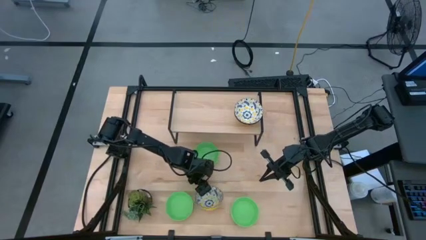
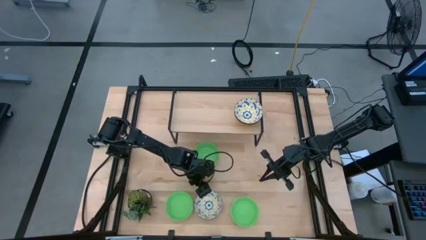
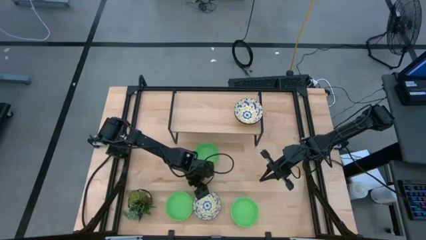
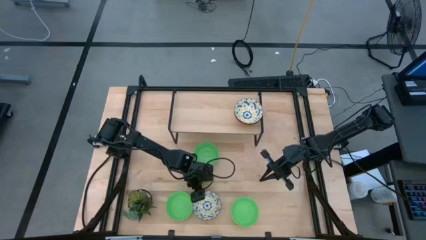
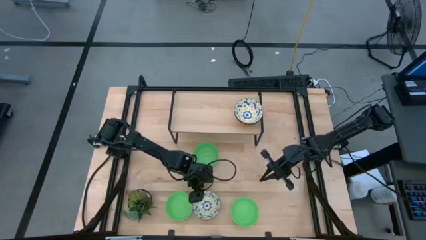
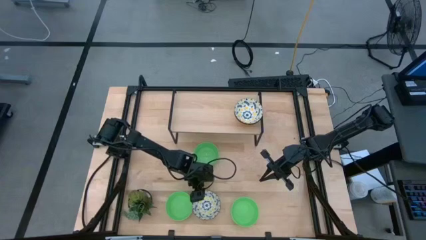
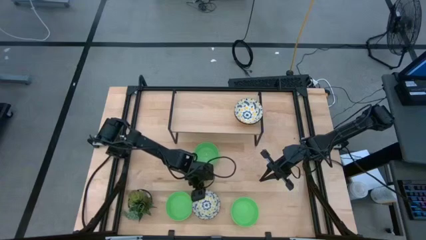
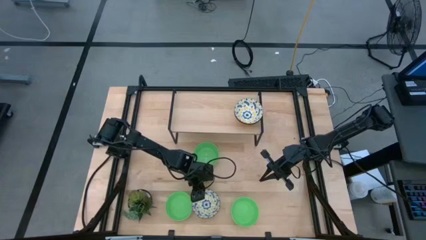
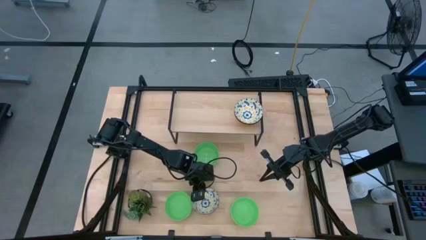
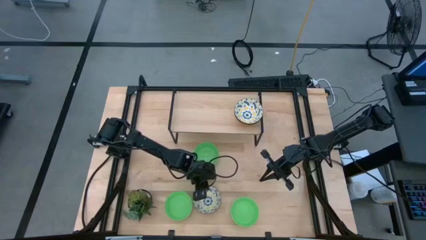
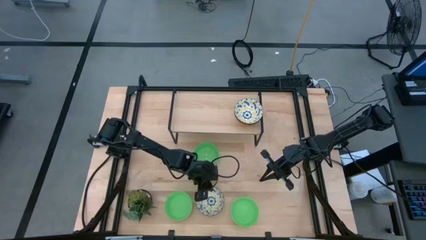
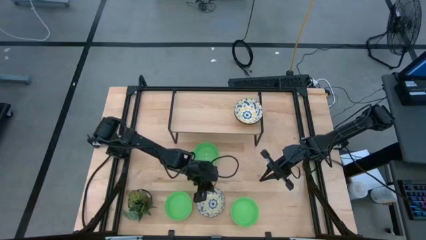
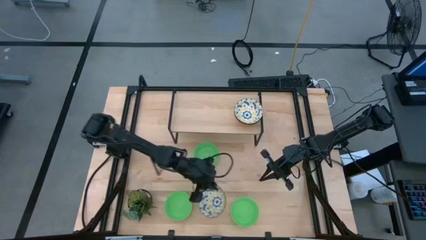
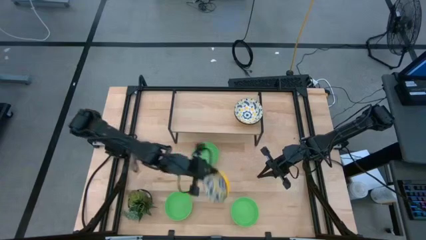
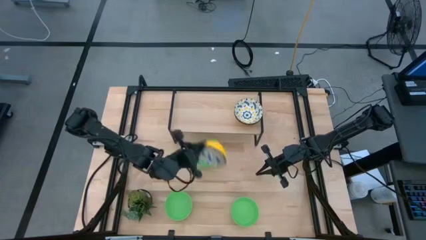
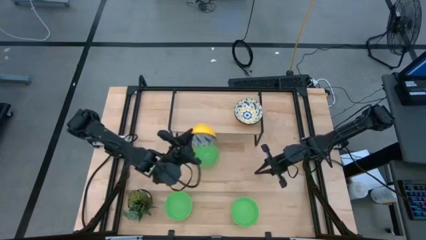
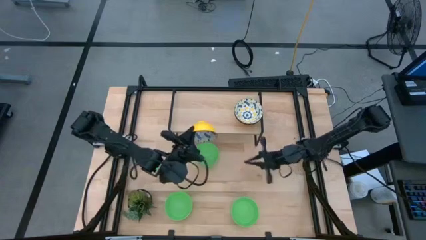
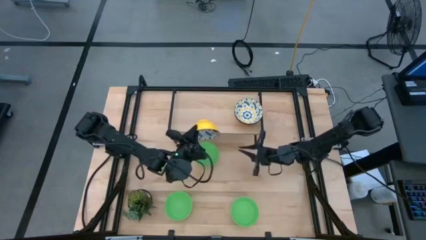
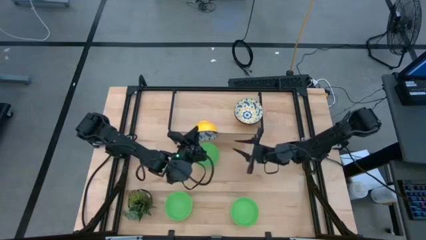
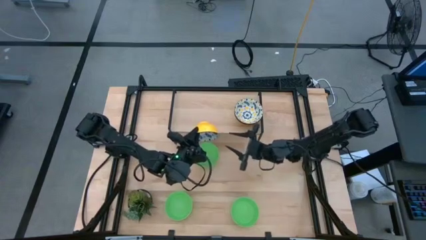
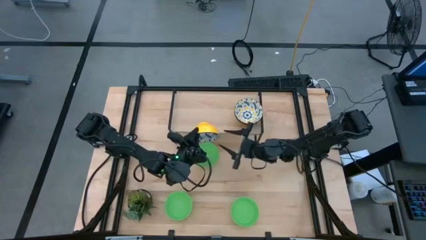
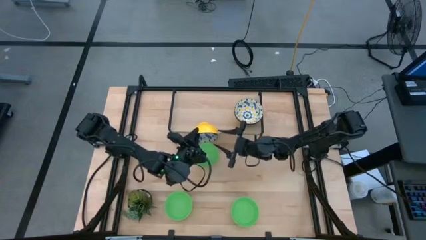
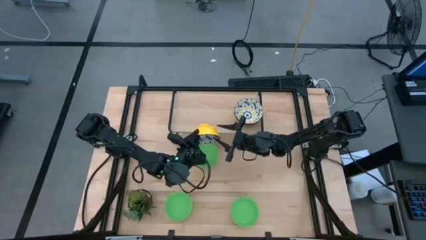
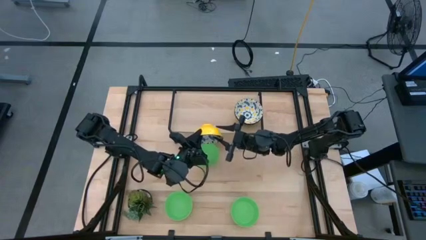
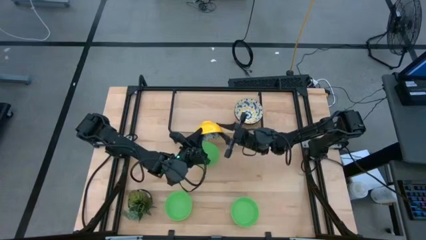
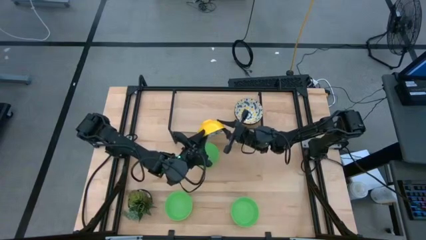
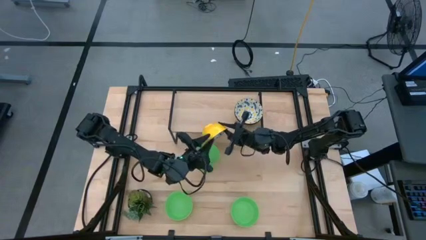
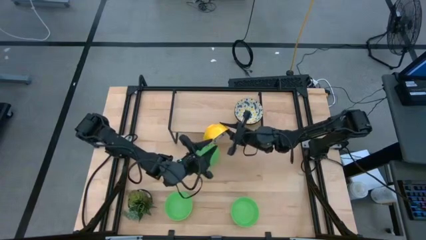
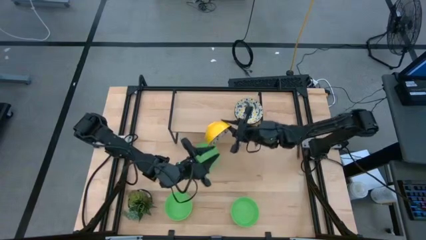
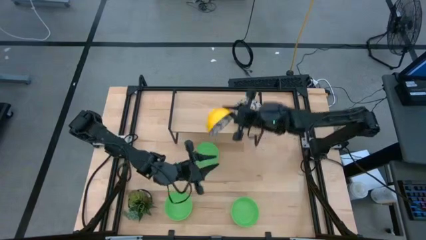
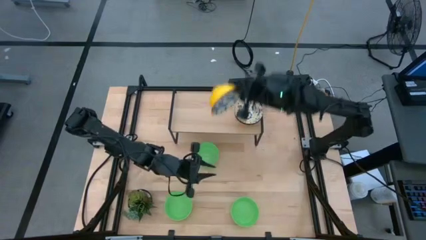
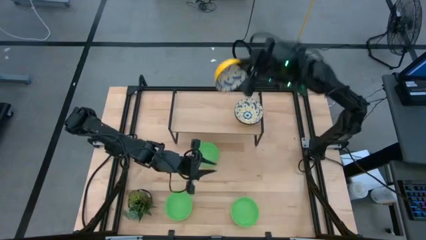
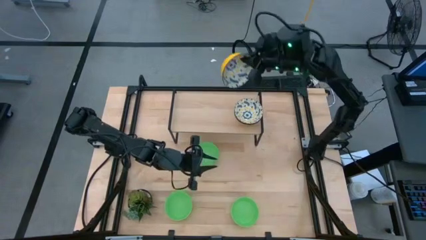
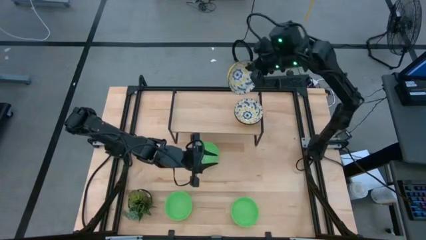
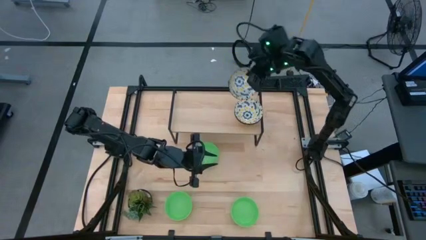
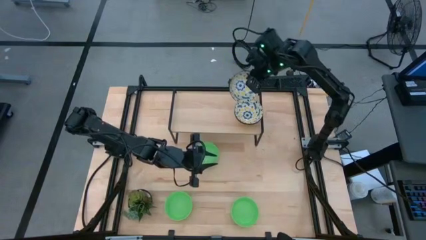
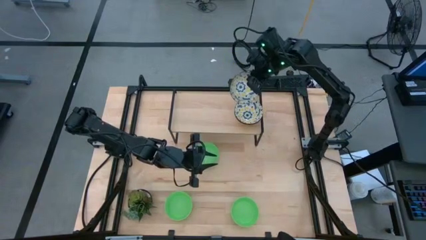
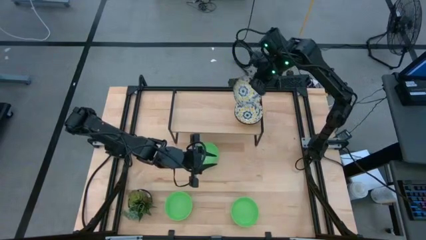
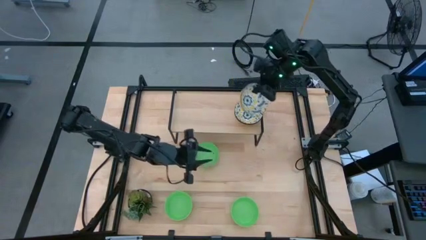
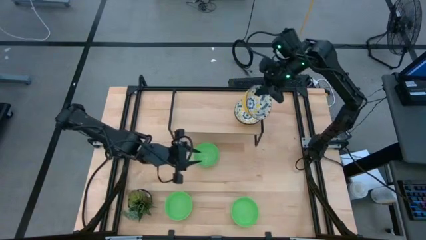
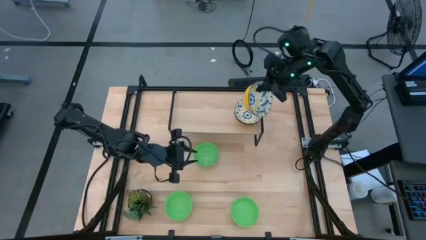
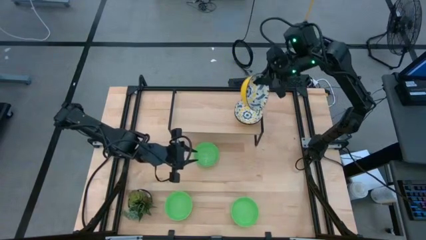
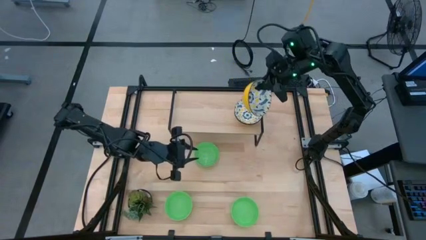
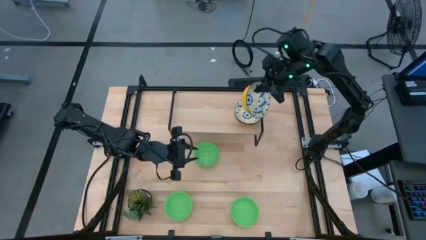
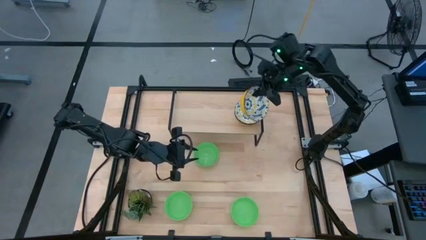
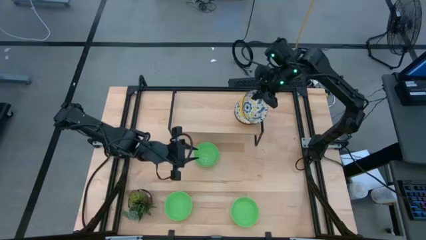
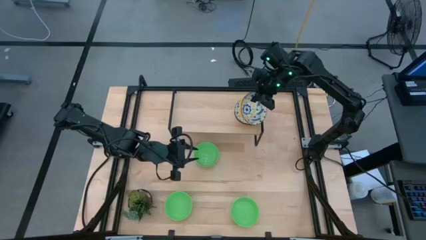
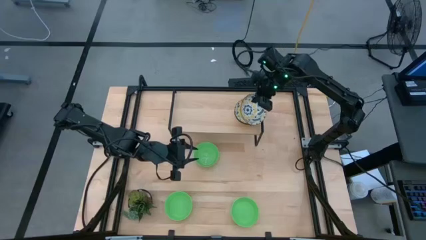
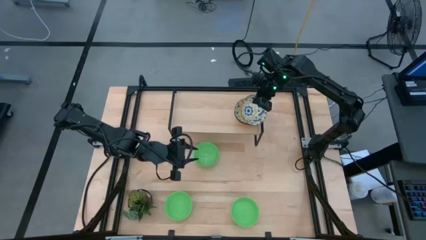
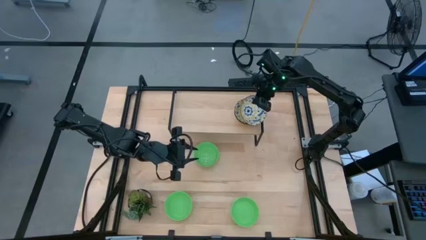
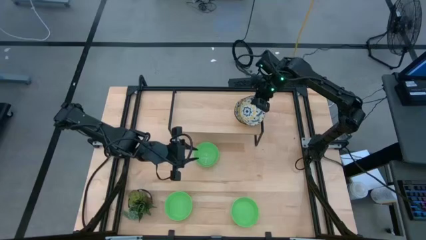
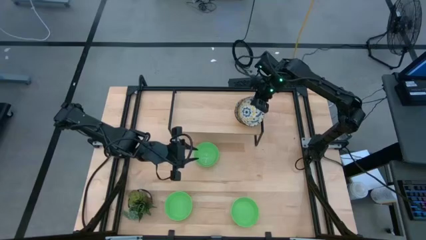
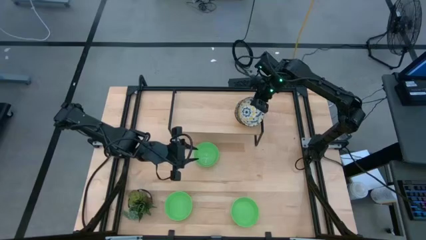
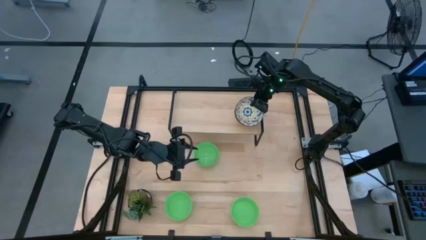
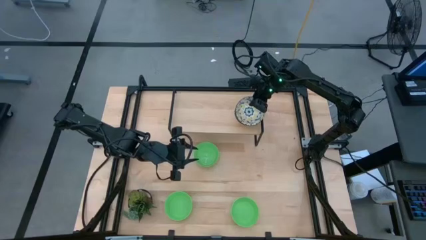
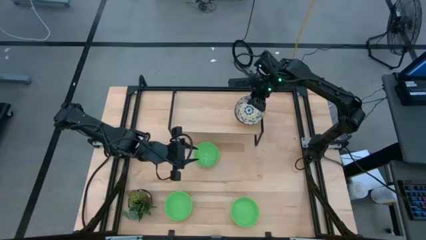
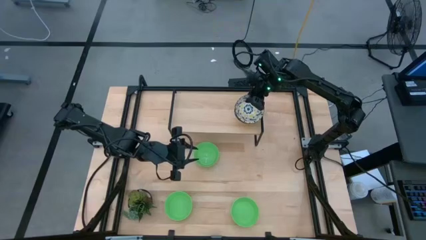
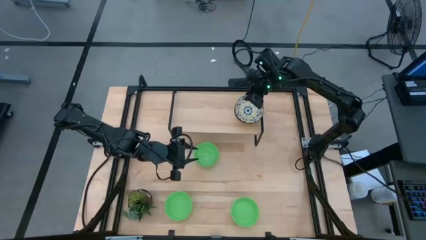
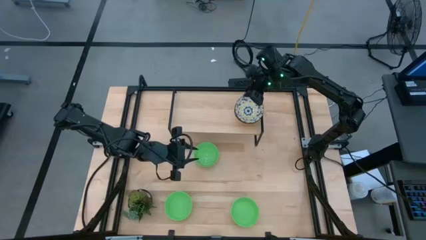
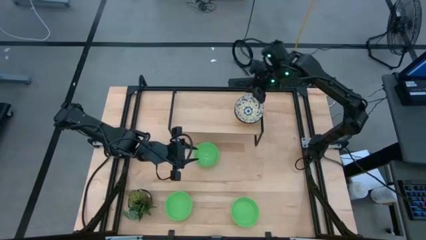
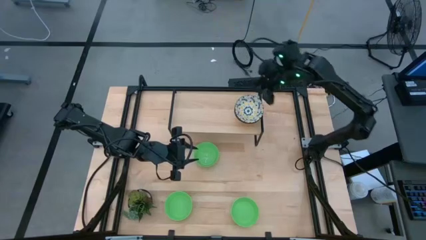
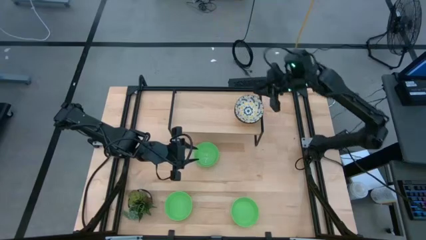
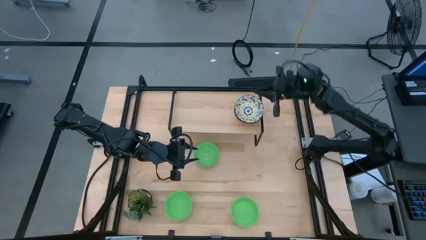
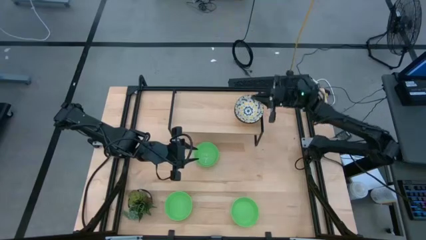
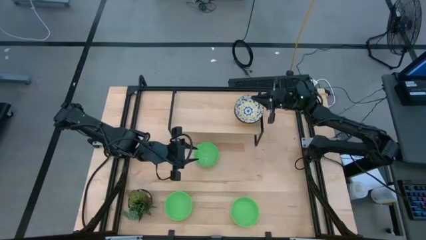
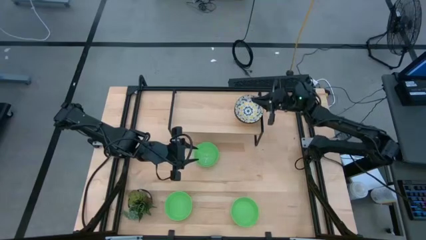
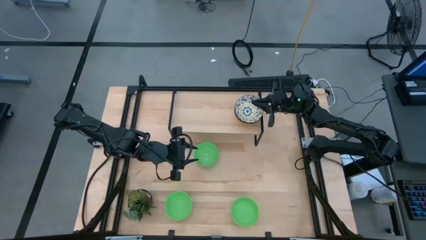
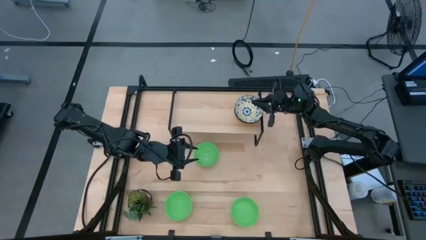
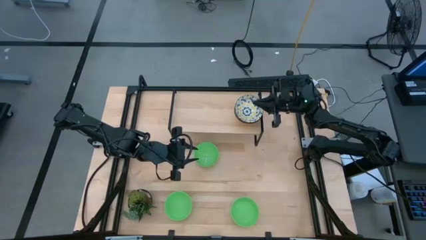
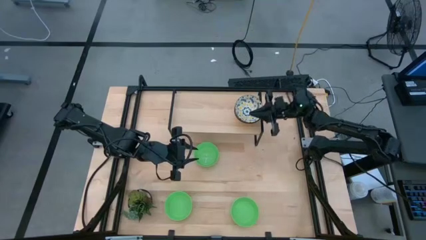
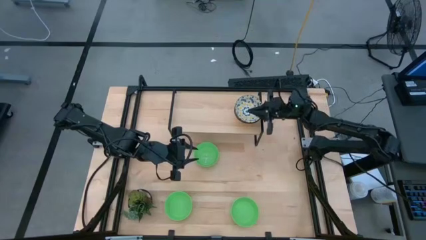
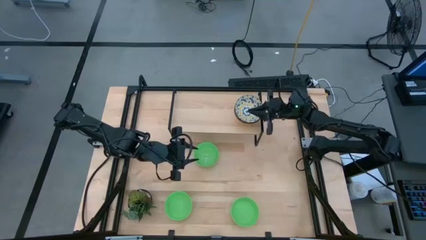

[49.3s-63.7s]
Task: Pick & Place Mini bowls
Stack the white bowl on top of the white bowl on the shelf

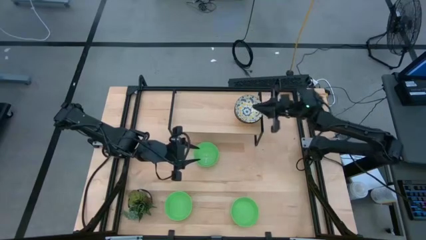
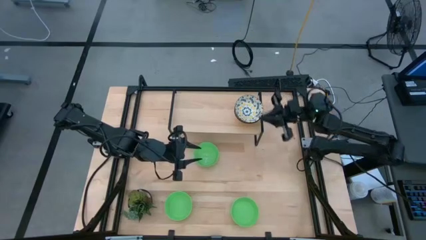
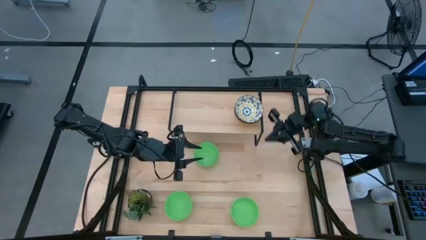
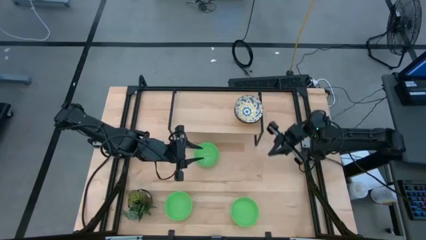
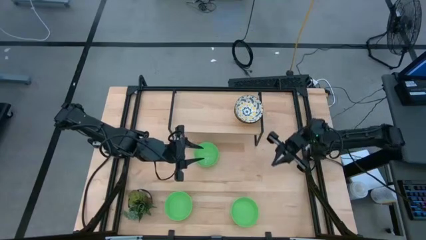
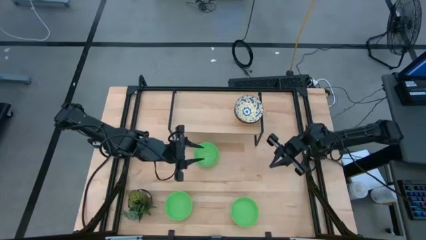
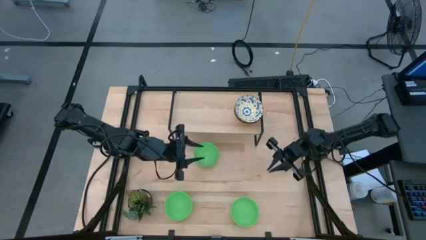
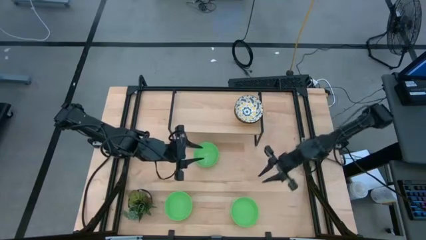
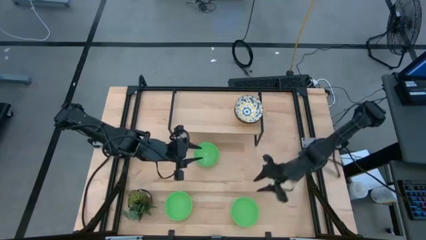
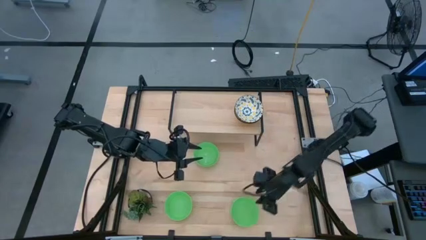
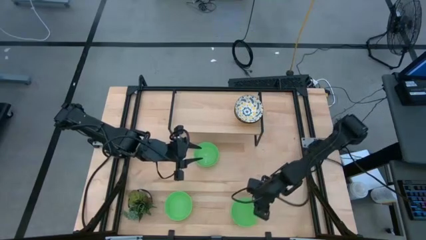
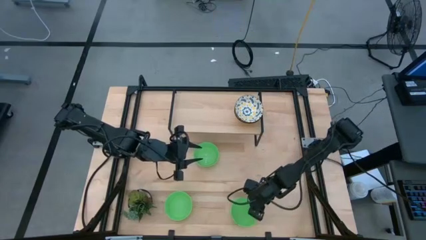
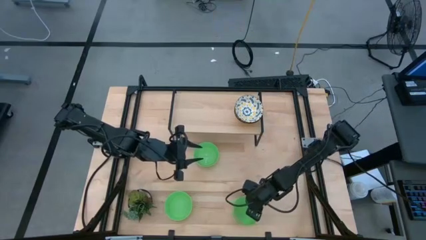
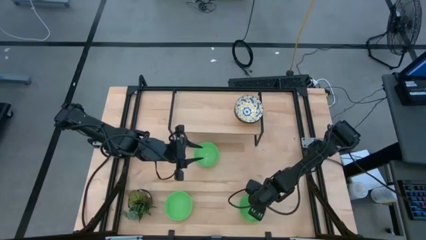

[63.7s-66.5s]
Put the bottom right green bowl on the shelf
